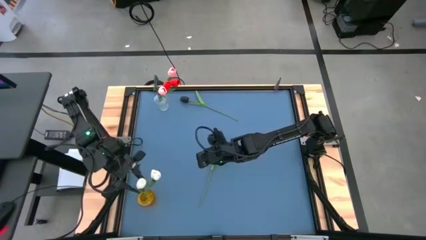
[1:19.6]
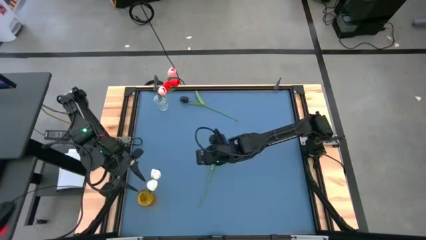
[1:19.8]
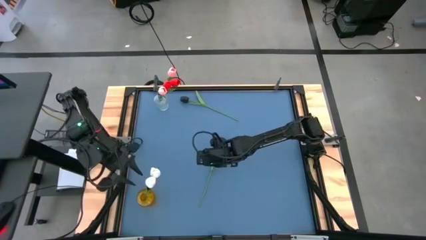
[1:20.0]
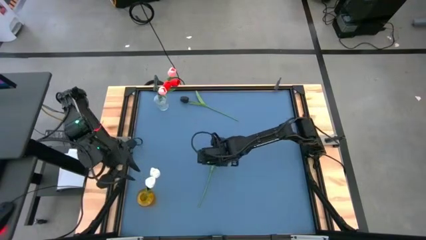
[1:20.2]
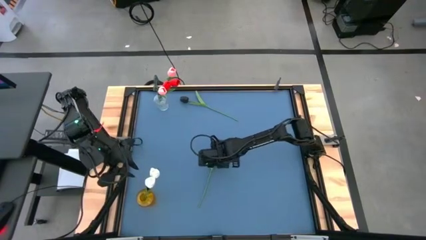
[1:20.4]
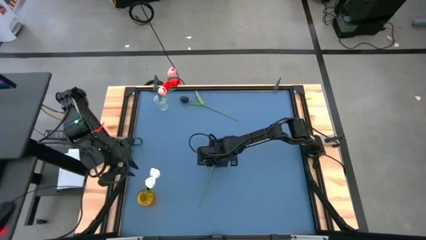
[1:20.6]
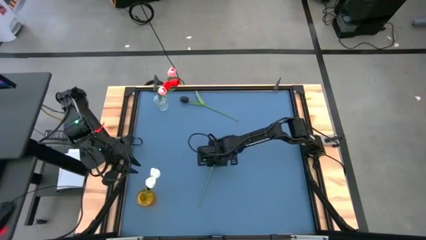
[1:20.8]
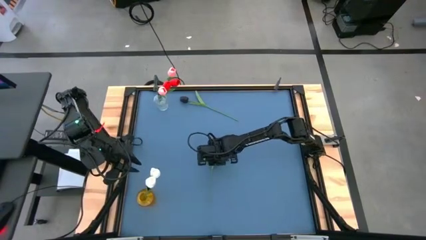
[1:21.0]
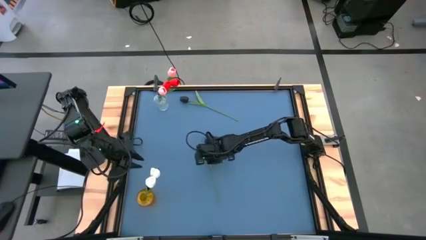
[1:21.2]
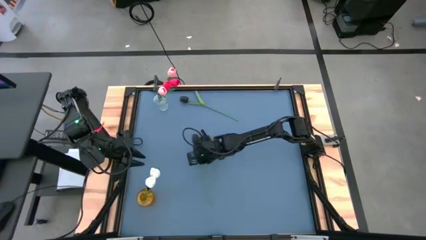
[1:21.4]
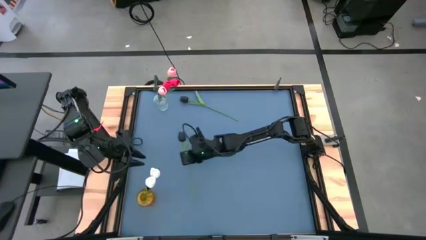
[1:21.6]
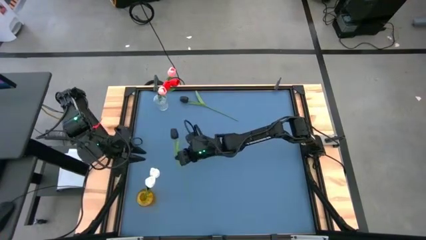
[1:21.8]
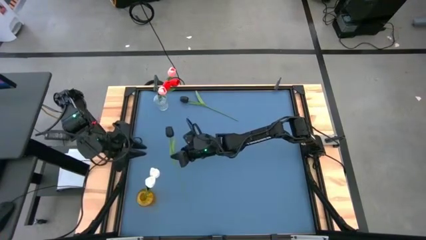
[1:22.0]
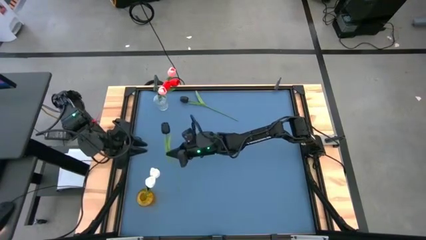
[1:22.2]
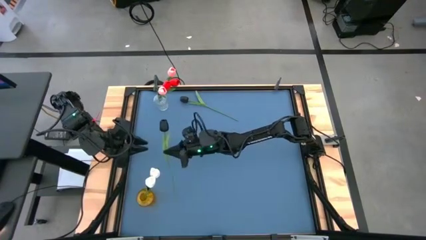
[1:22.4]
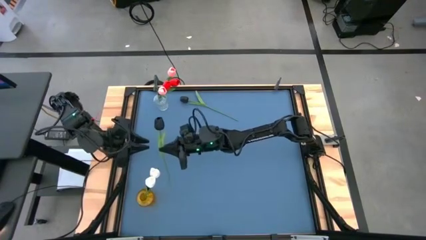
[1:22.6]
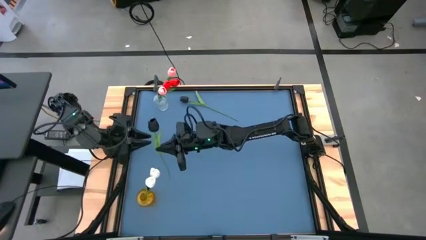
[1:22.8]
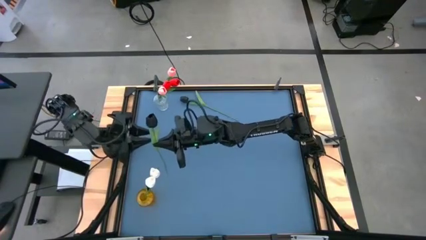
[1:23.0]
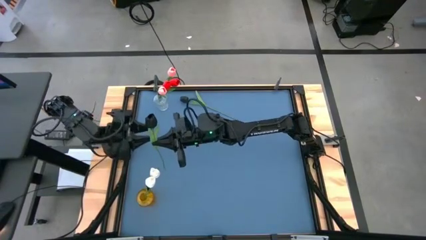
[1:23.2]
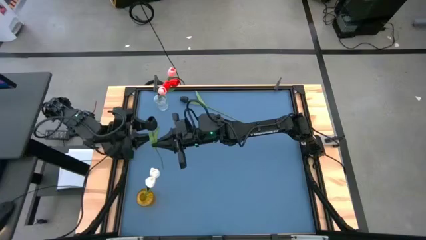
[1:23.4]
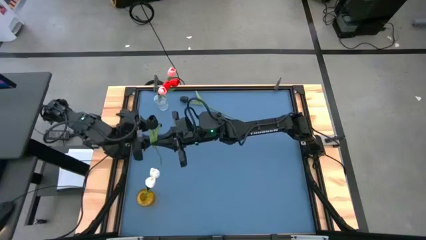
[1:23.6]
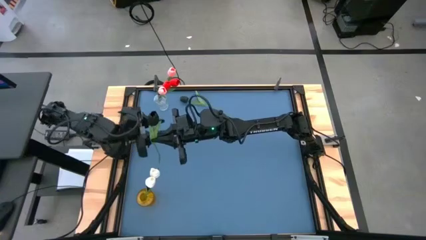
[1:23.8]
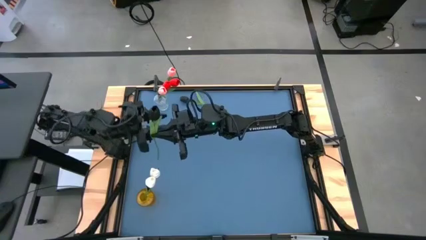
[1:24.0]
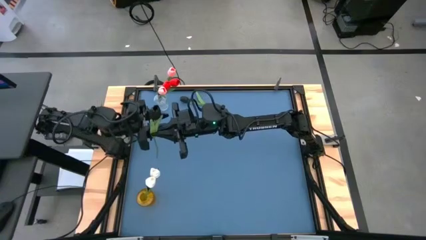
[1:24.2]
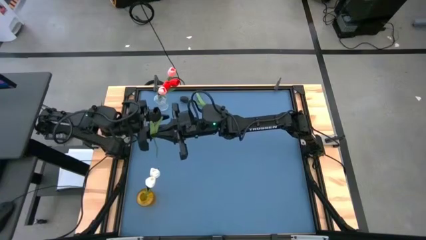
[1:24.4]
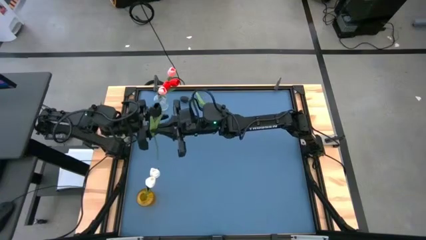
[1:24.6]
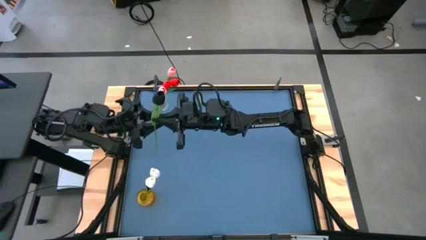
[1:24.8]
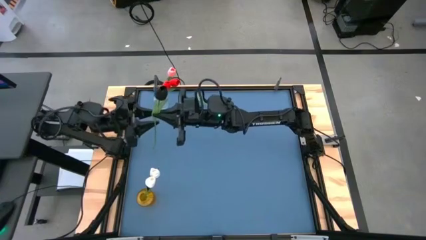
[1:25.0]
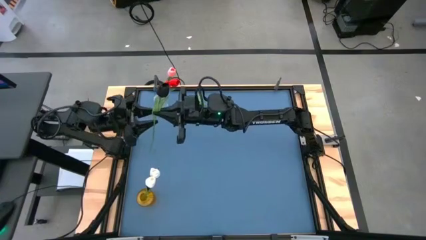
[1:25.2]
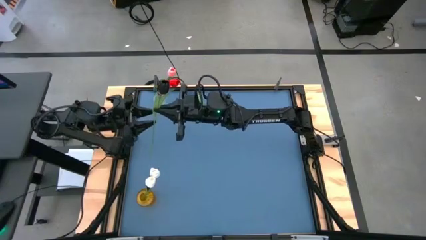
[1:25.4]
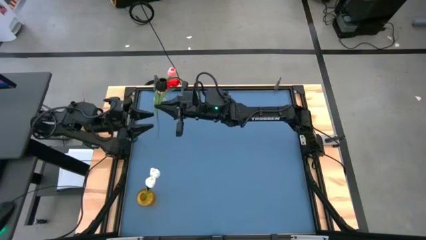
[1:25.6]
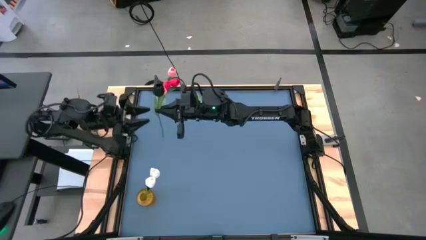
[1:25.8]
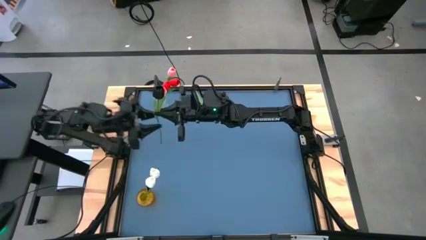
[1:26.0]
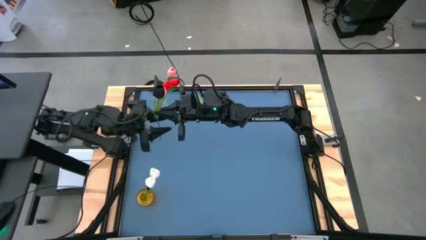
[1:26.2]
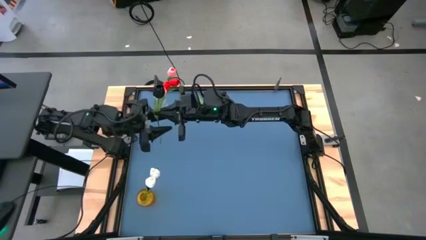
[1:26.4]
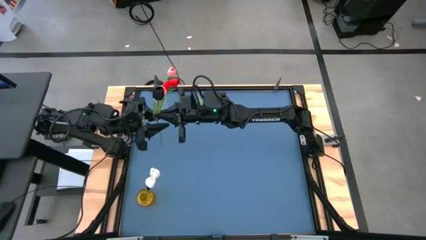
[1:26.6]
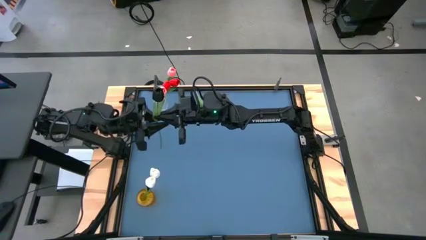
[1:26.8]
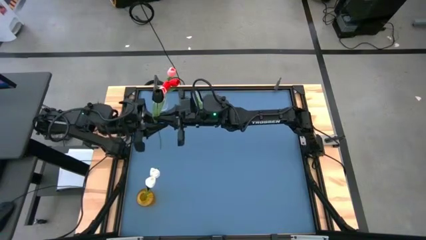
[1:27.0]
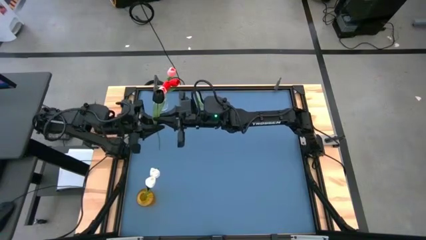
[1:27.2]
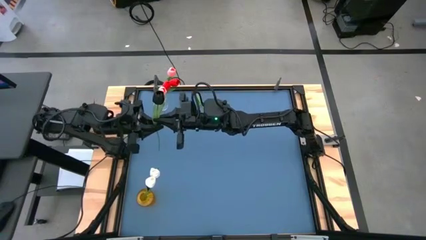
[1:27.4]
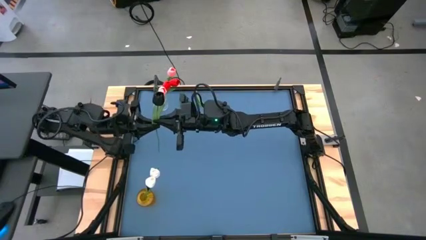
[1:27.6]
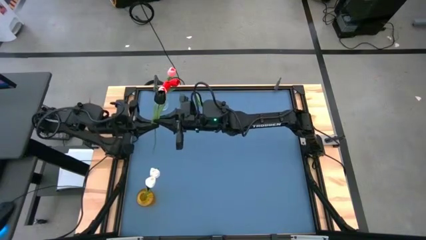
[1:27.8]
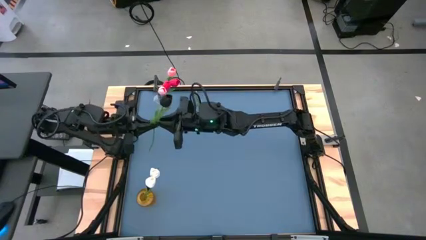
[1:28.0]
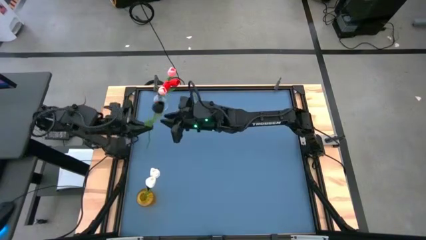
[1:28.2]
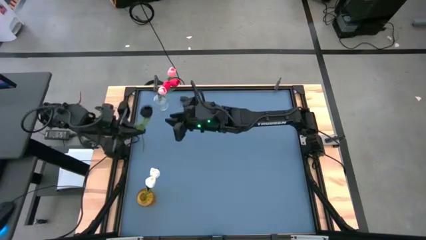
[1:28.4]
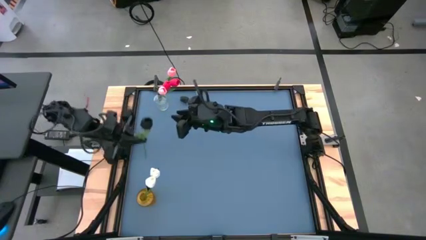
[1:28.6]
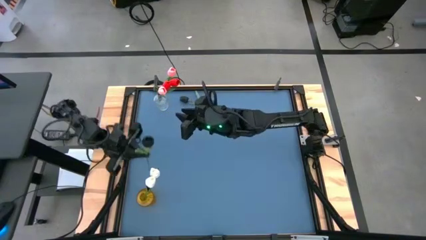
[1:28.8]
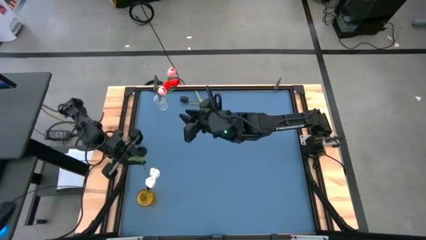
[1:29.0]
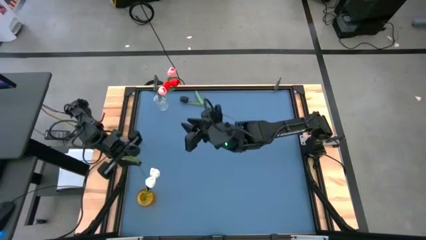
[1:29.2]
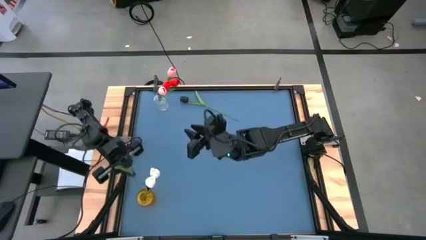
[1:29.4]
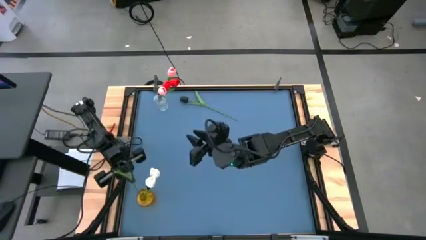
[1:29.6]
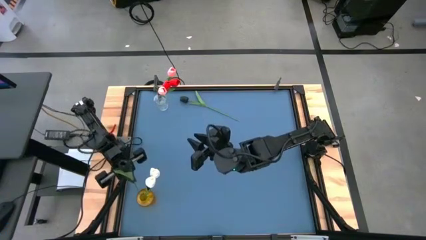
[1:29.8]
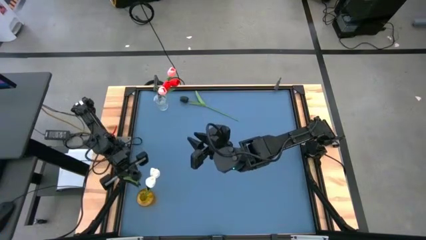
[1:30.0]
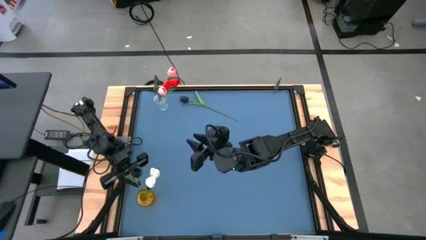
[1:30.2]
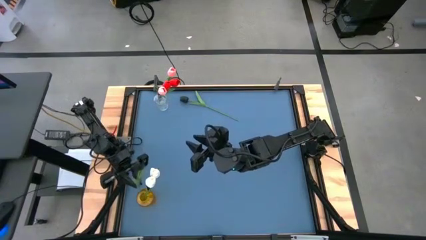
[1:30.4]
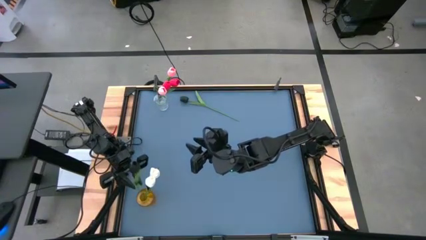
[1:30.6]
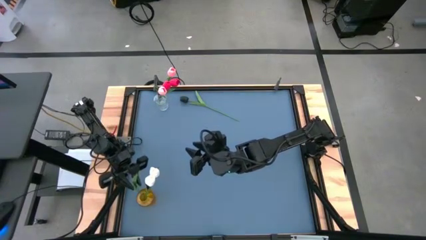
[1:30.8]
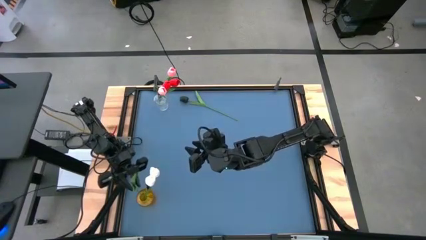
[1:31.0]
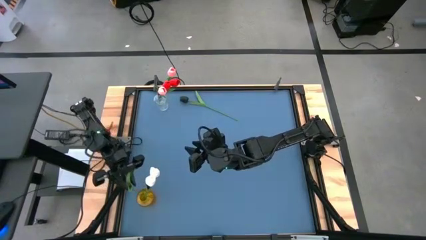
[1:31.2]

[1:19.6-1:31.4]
Task: Sort flowers into vase by color
Put the black flower into the yellow vase

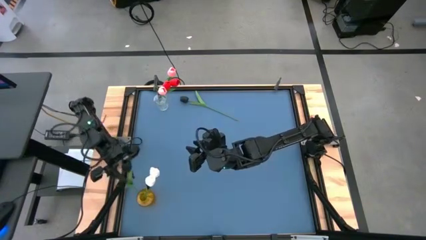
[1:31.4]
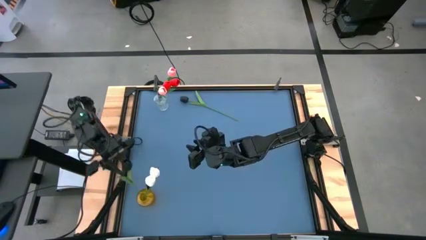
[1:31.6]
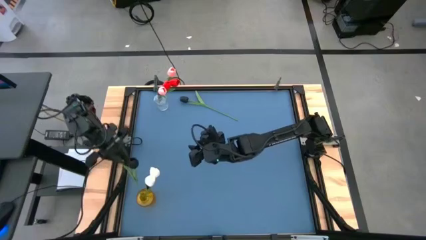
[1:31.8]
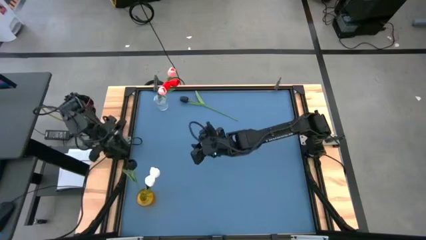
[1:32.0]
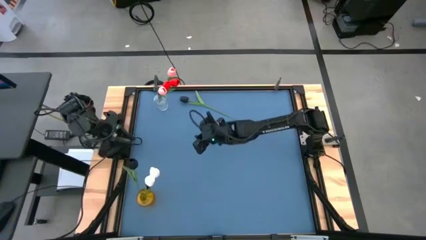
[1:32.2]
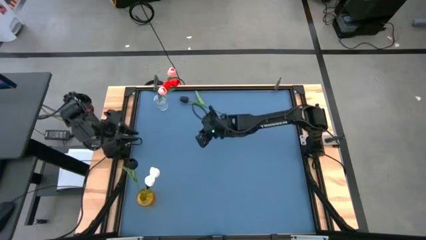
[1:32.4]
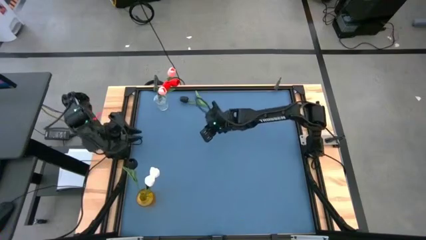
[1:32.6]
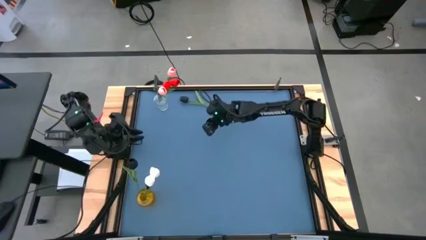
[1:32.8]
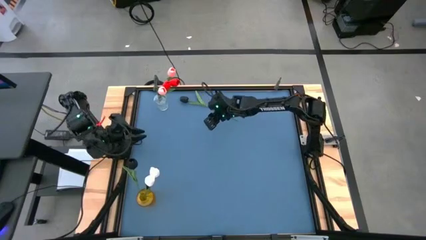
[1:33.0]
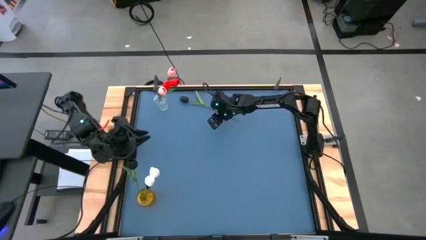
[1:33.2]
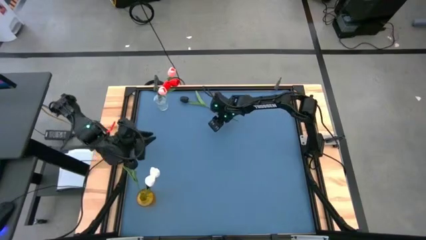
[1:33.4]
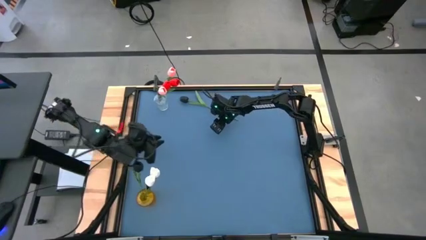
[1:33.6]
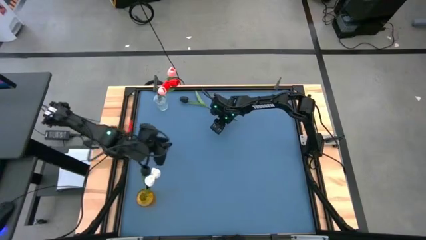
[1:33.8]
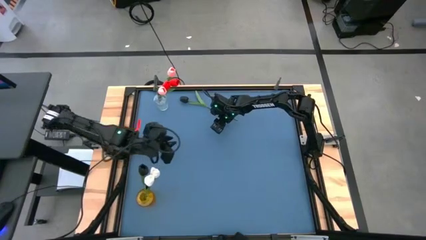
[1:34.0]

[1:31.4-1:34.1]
Put the black flower into the yellow vase
